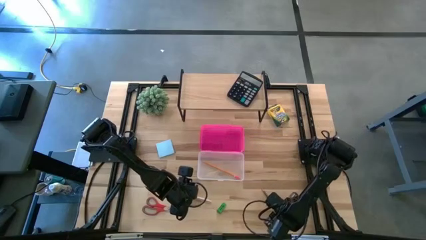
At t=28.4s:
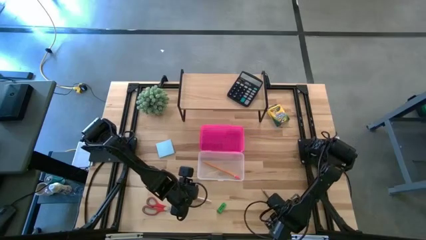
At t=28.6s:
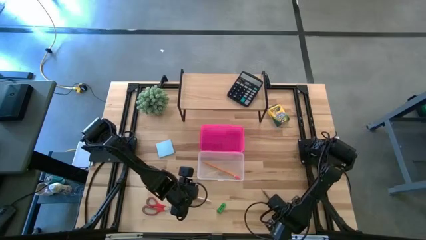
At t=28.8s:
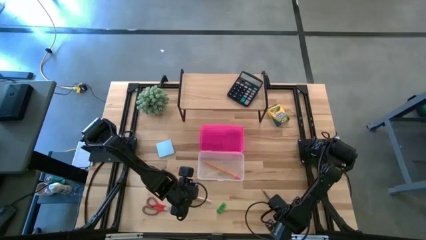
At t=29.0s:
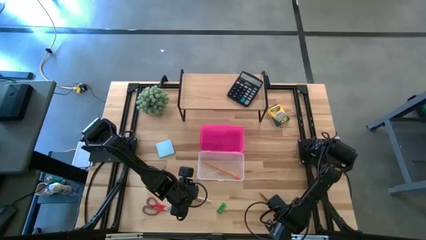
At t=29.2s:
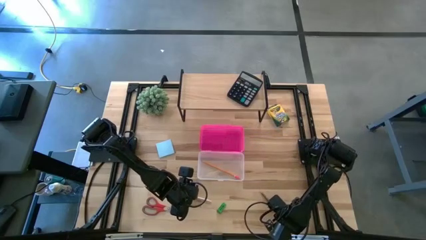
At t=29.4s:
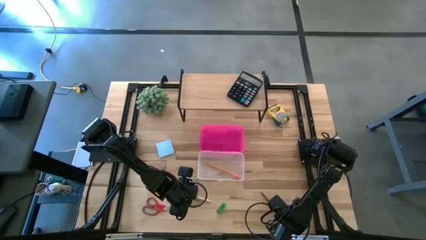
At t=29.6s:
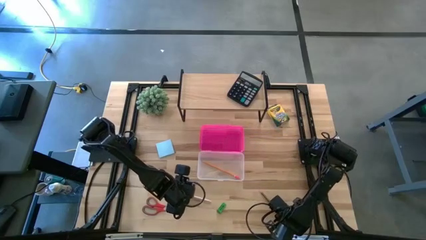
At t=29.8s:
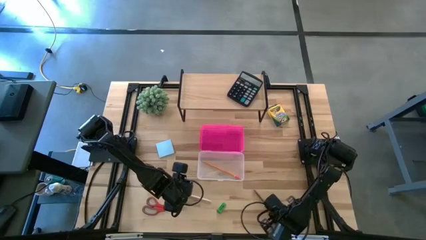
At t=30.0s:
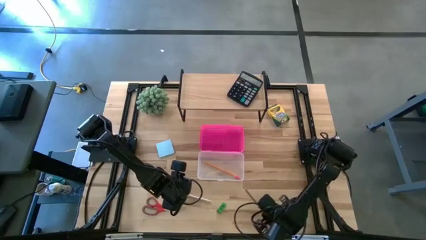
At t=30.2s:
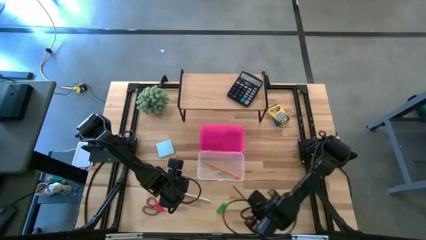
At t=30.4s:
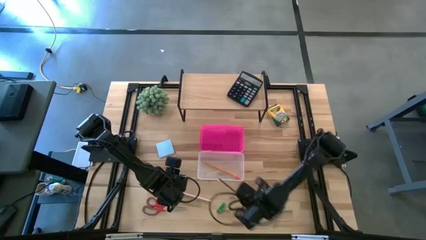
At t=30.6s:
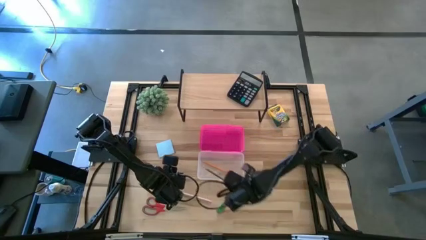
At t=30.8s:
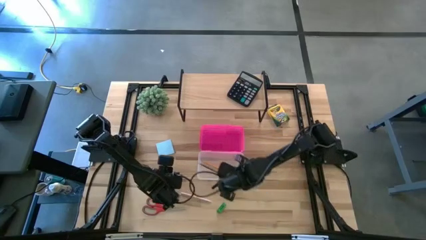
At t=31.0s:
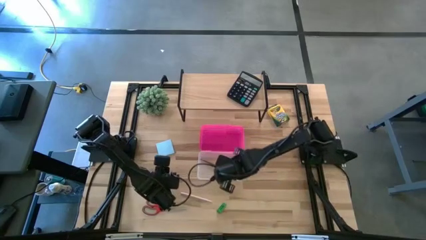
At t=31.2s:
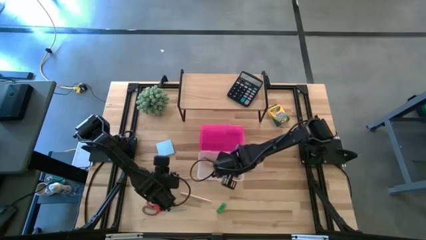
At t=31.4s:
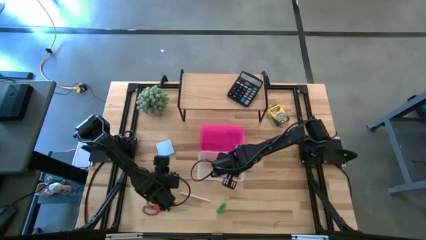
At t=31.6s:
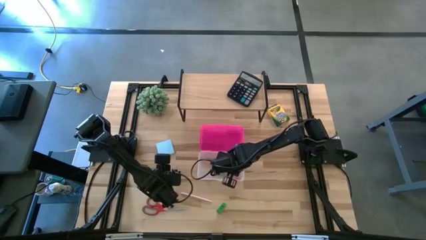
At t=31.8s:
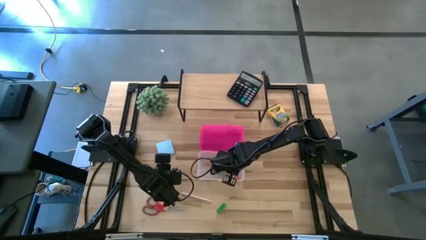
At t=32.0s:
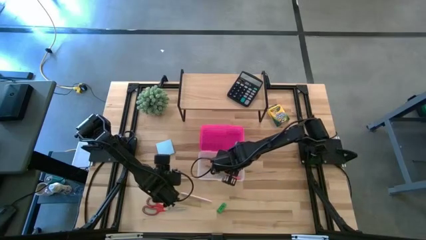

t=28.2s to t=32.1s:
Task: Pack school essentials
Put the black pencil into the transparent bin

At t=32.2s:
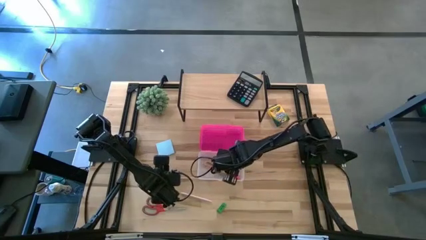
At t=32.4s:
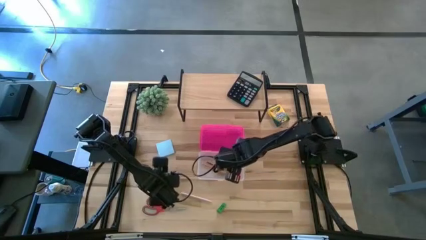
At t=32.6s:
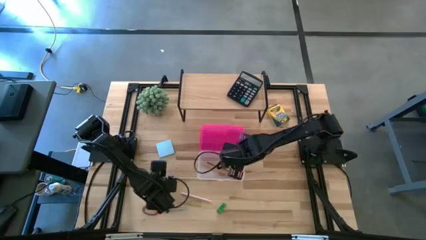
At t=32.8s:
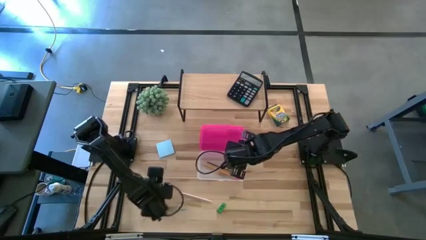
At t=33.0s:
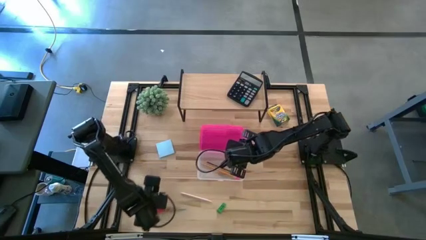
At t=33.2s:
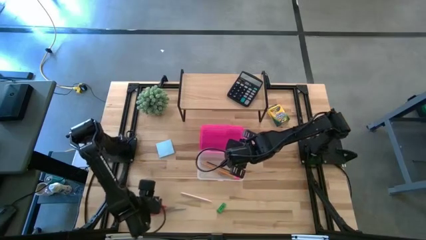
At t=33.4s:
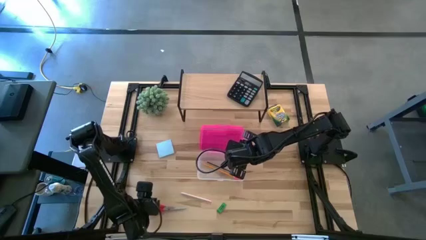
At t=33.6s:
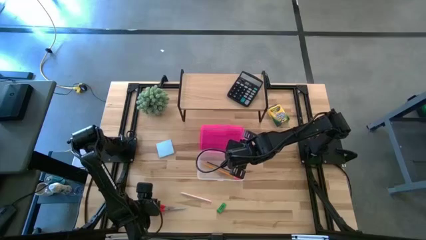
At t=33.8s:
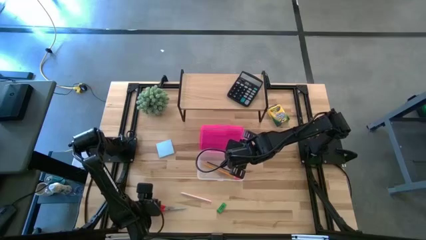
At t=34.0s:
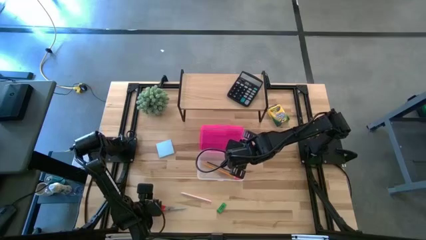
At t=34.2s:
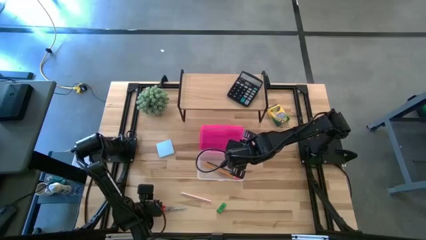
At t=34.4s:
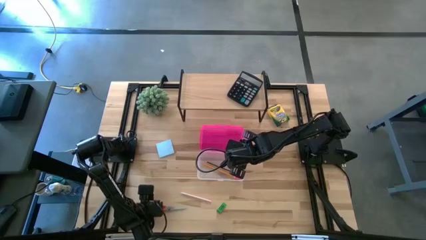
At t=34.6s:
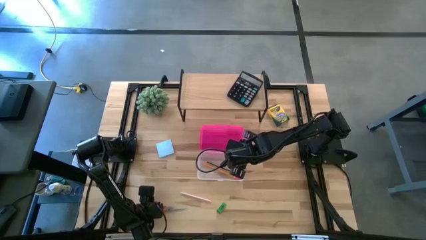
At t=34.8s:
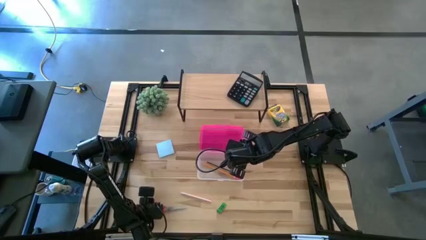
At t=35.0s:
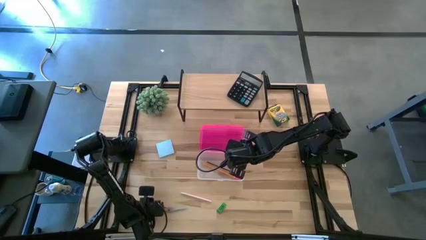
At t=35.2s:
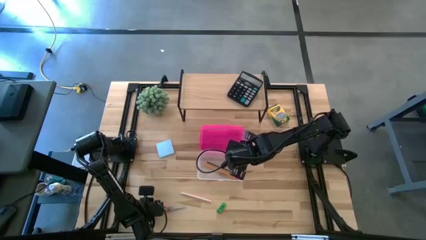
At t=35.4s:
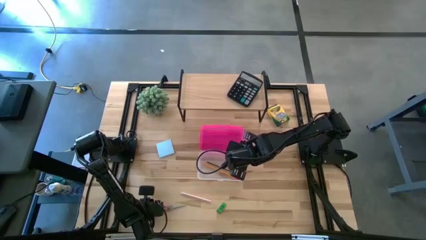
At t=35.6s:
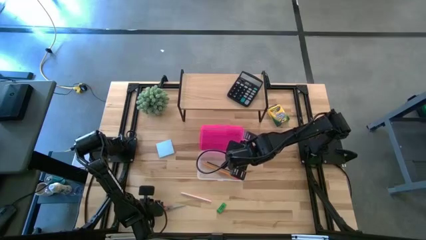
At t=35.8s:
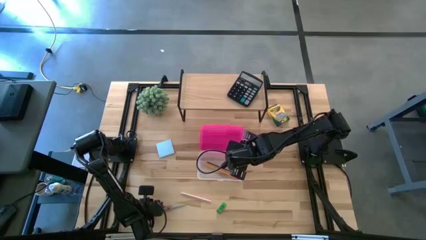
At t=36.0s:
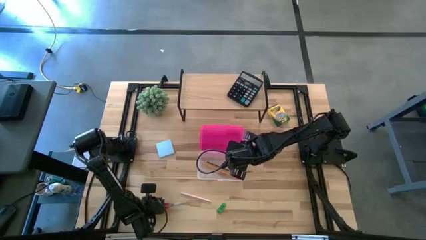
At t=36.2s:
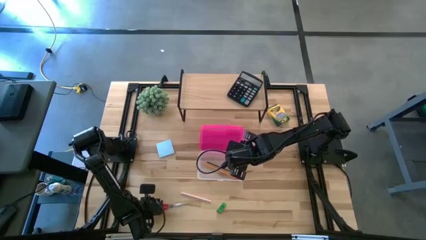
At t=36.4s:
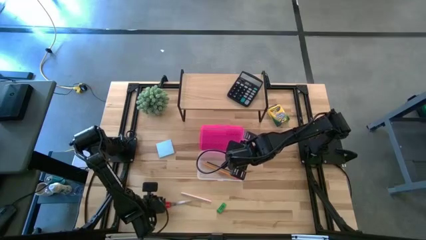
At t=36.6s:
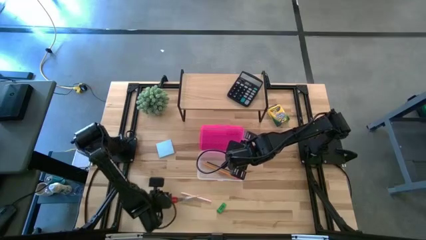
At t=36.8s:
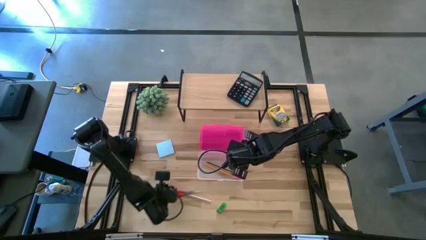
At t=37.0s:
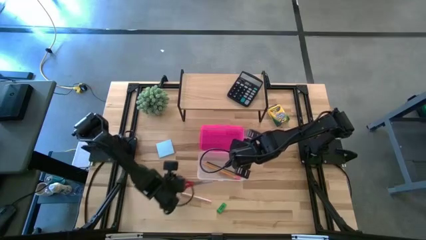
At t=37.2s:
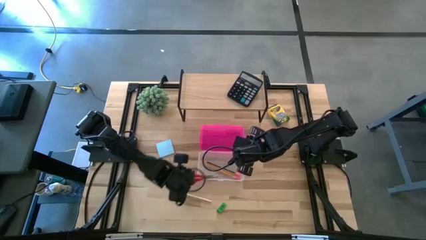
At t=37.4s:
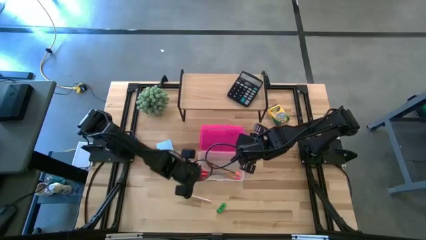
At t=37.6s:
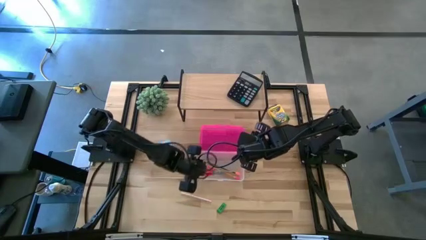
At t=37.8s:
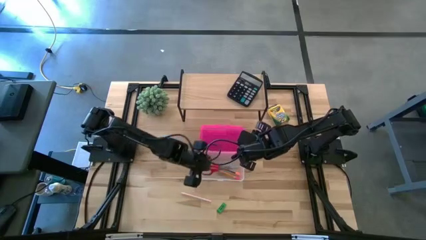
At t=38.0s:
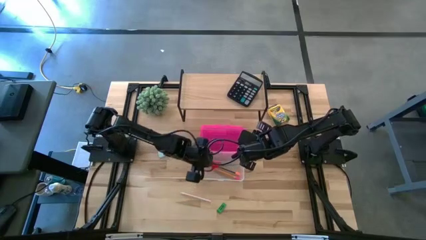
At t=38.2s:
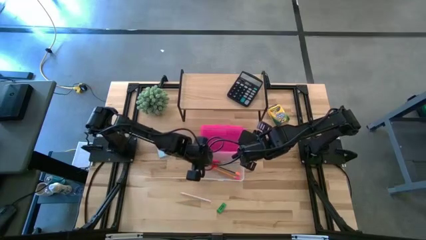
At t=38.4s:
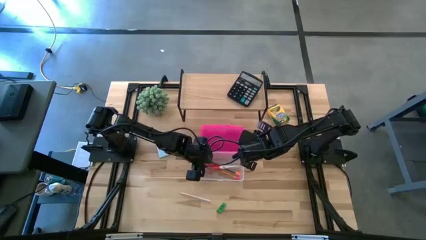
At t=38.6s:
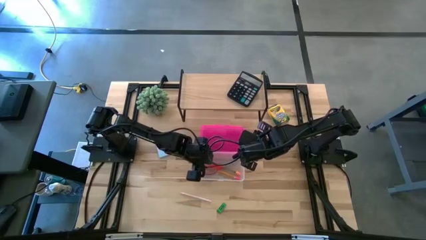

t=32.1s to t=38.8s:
Put the orange scissors into the transparent bin

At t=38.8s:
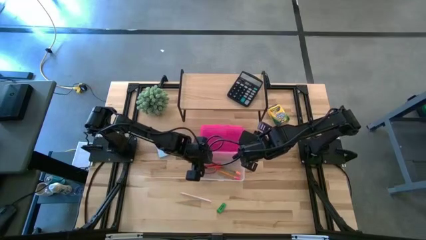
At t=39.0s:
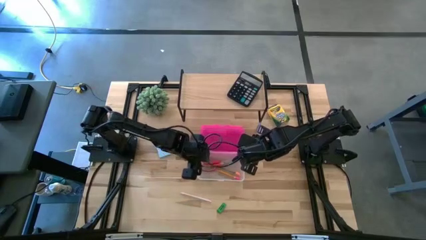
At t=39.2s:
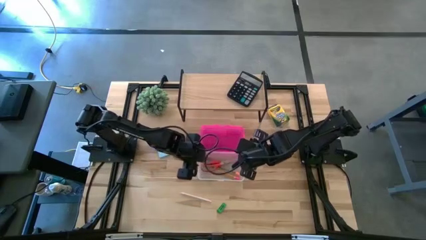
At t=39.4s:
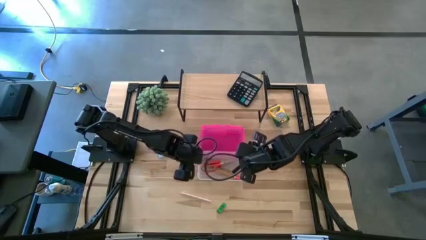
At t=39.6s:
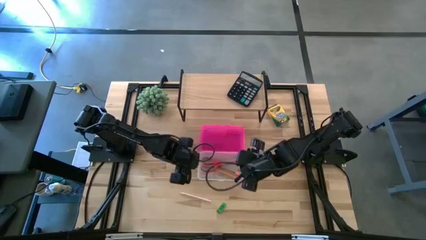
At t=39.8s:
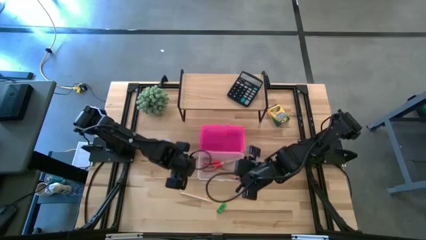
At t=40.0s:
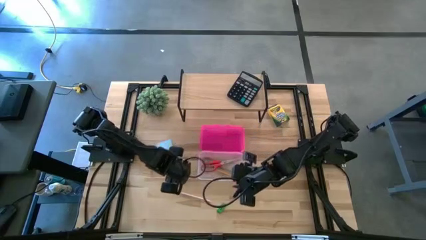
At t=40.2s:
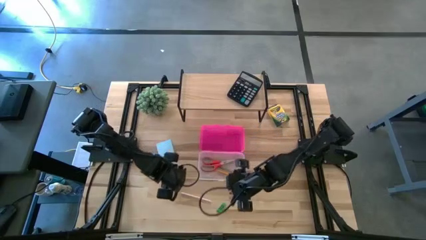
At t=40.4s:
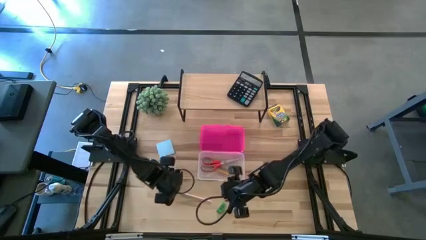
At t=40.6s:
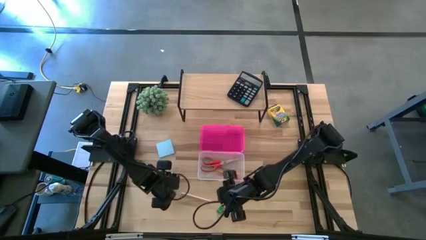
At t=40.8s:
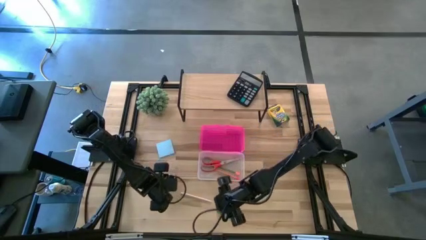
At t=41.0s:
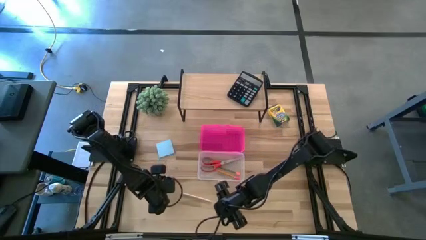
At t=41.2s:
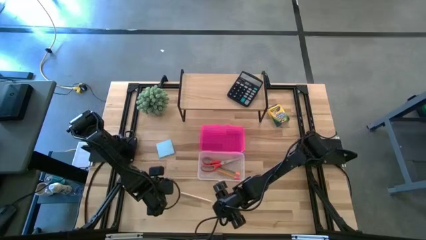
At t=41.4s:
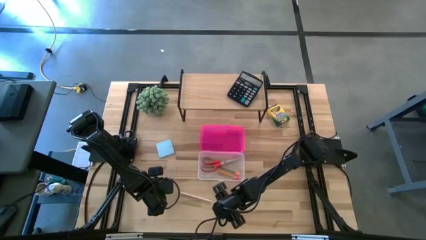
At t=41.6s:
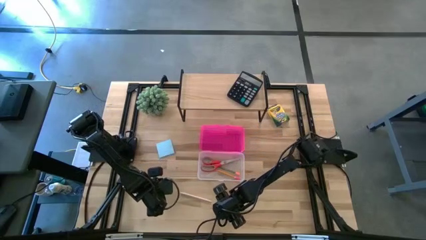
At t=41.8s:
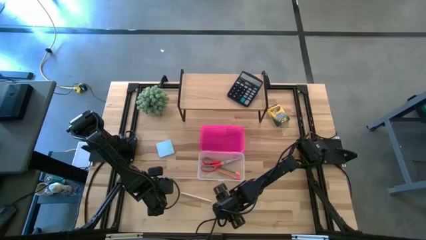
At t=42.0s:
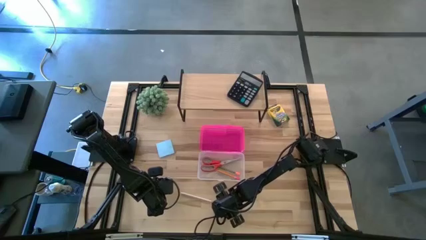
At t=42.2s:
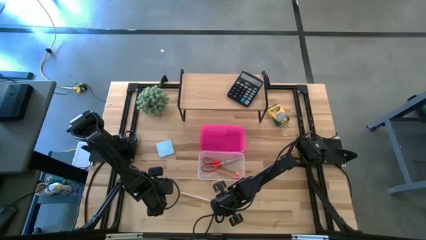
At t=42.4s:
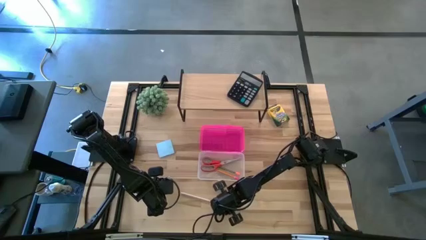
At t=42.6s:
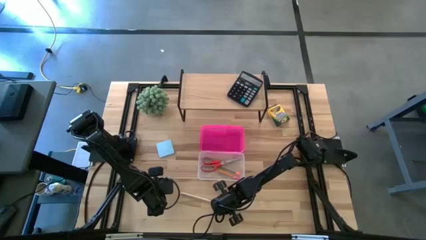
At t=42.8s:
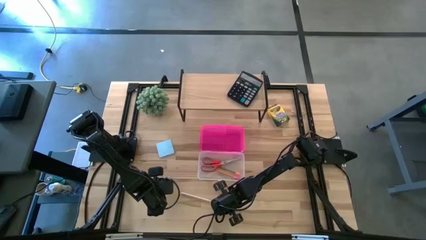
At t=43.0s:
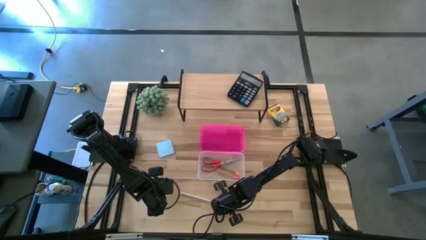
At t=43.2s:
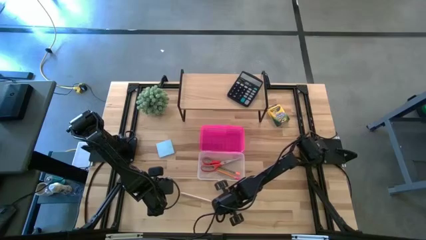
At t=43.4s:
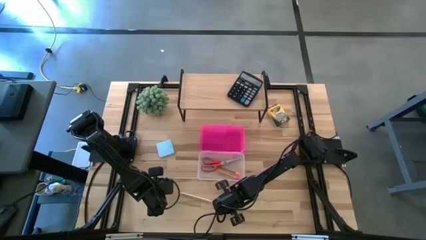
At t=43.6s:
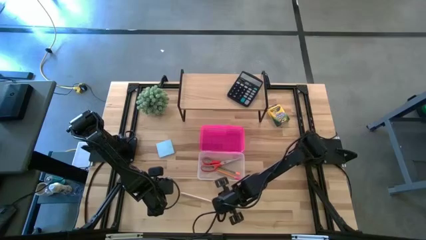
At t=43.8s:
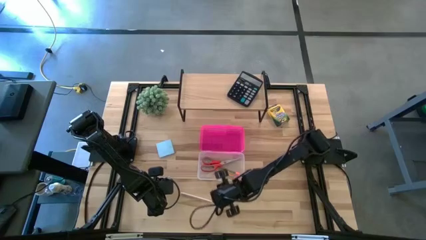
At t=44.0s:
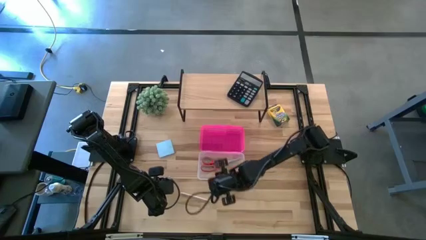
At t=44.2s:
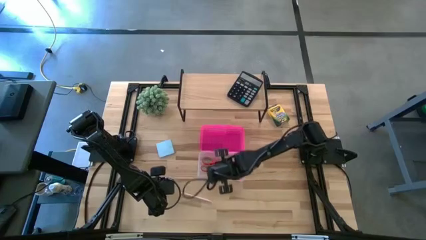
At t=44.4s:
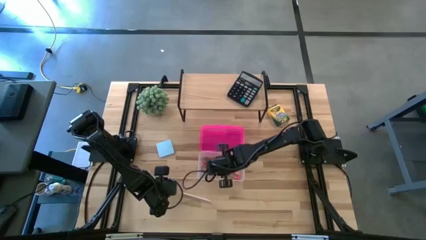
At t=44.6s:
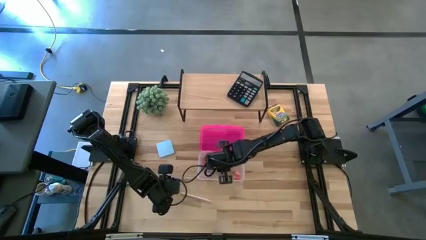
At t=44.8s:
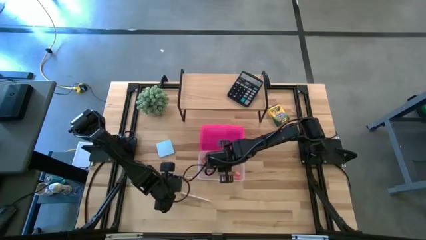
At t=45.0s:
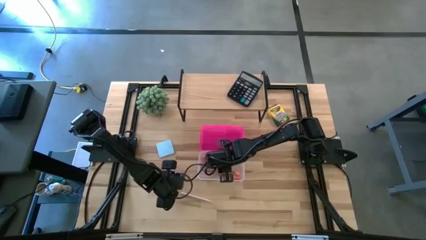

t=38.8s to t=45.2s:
Put the green eraser into the transparent bin
